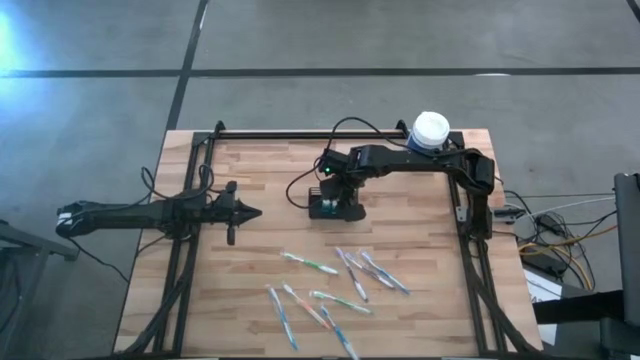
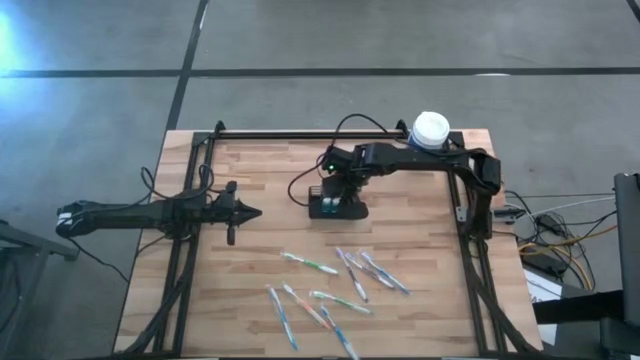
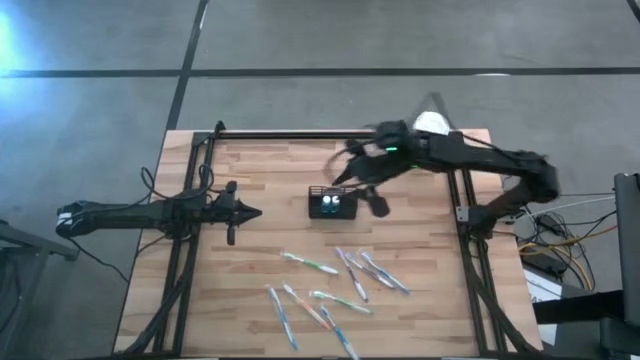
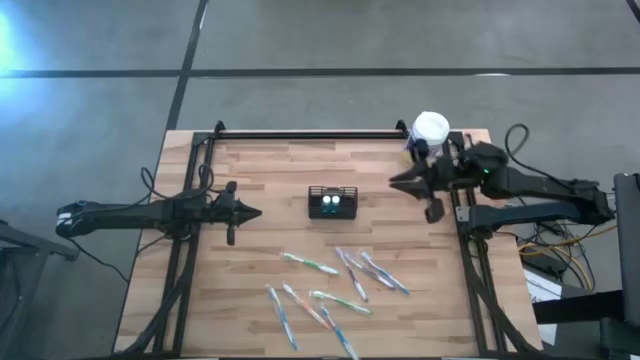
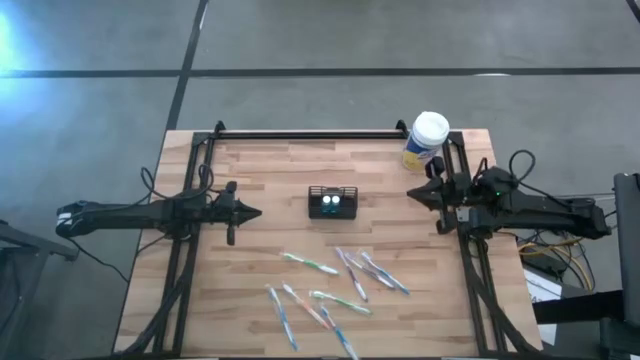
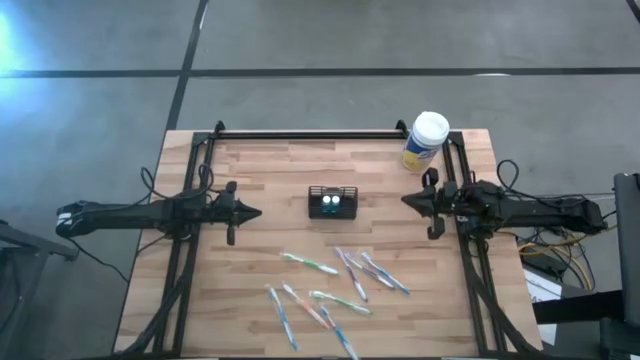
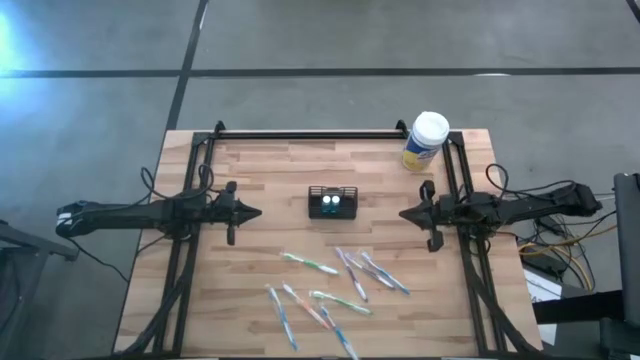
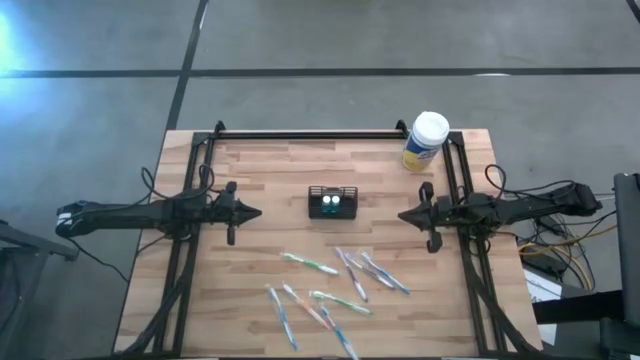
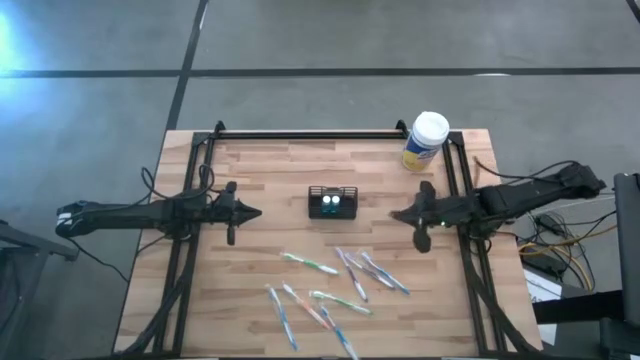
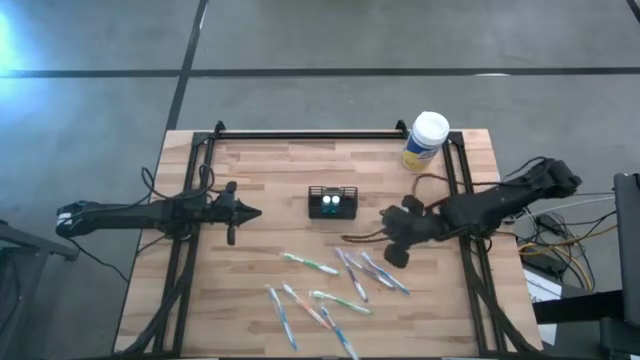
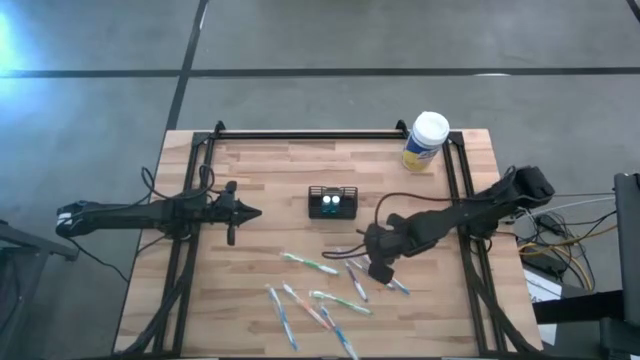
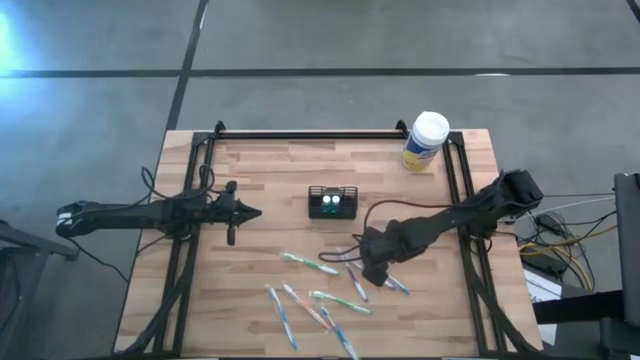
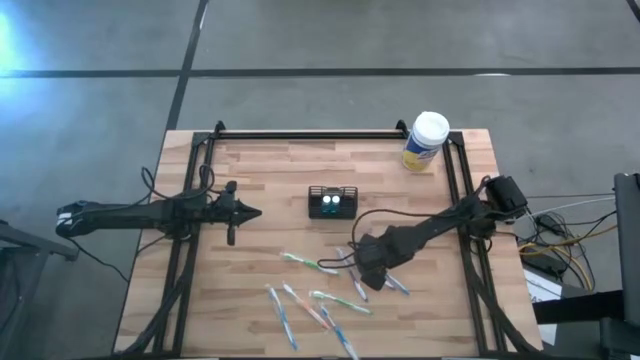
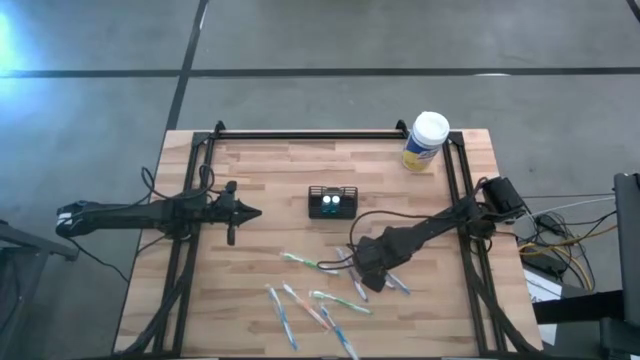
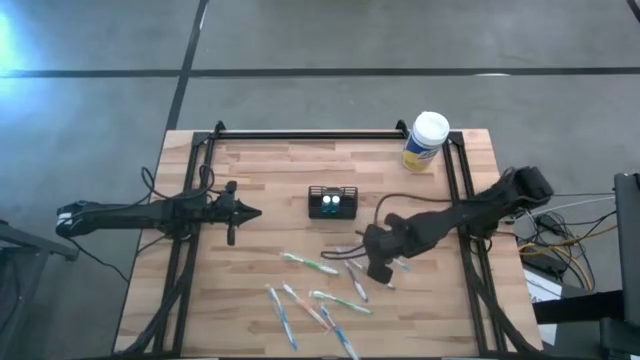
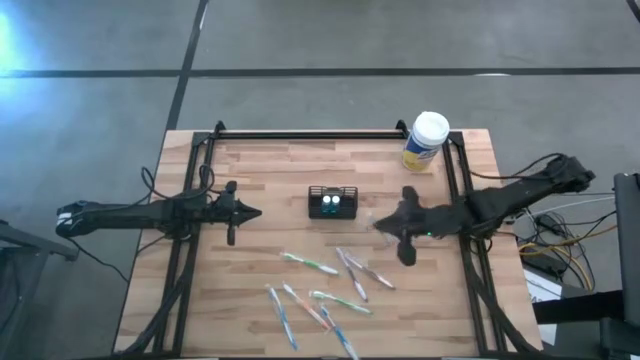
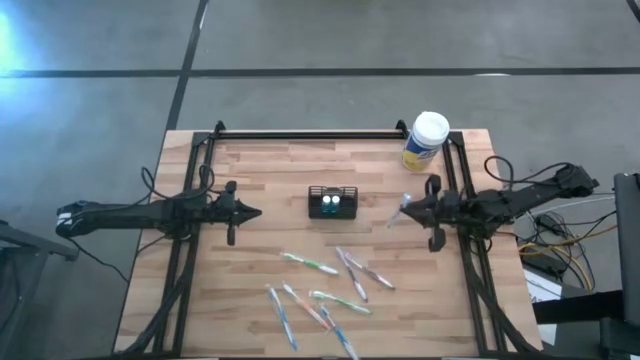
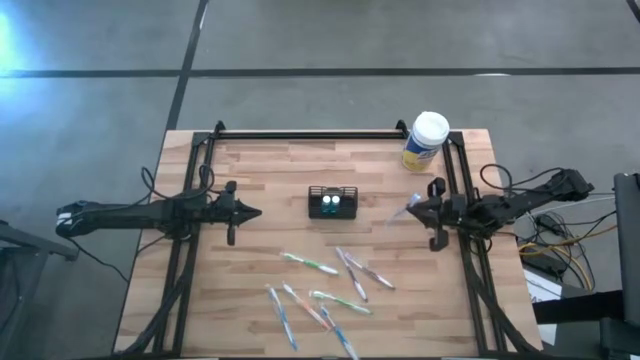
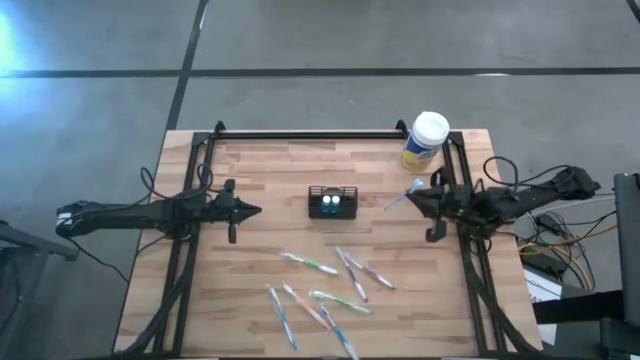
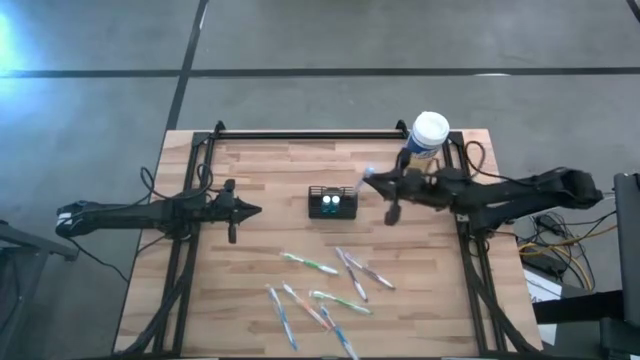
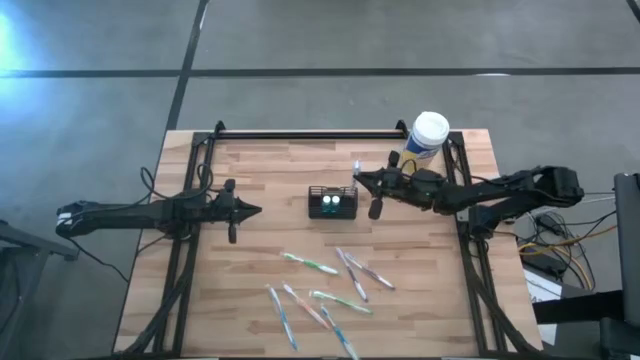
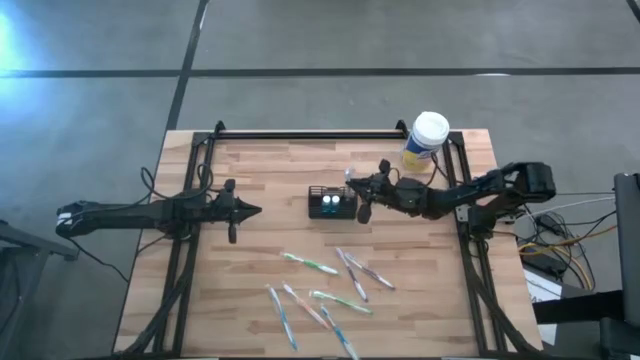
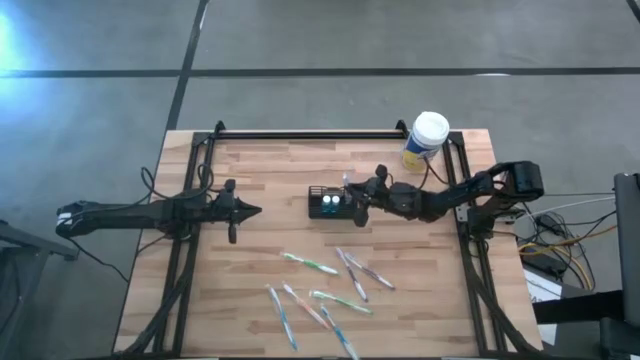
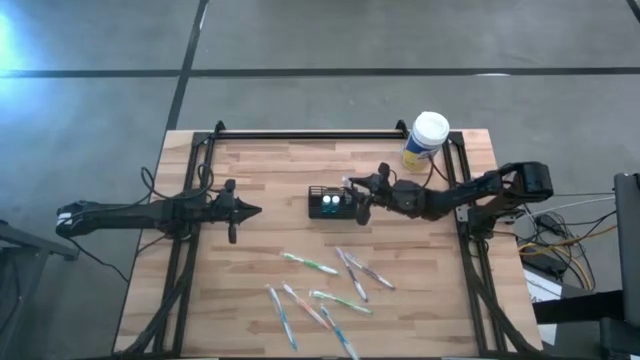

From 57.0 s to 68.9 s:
Task: Pick & Place toothbrushing station
Put the top right blue toothbrush into the black organizer

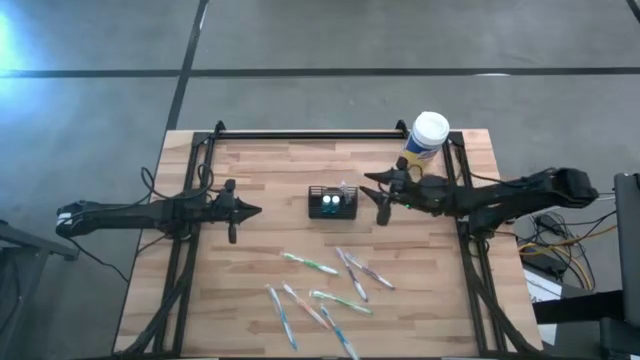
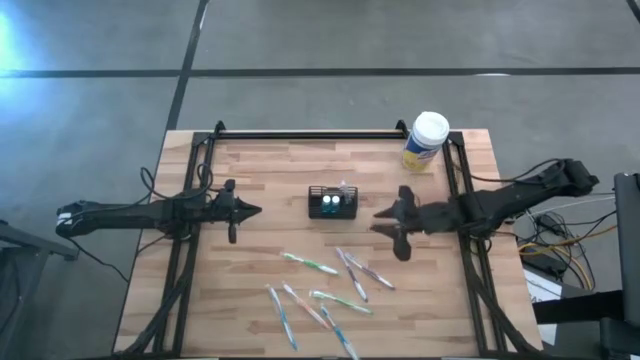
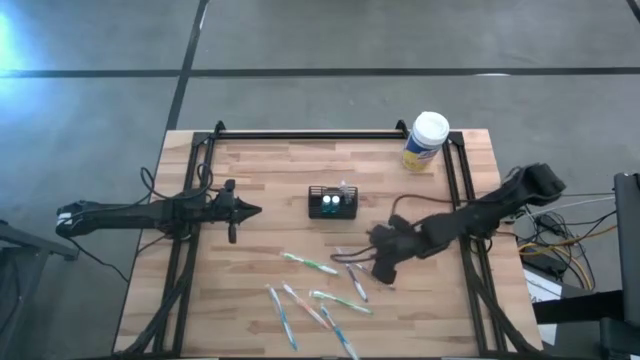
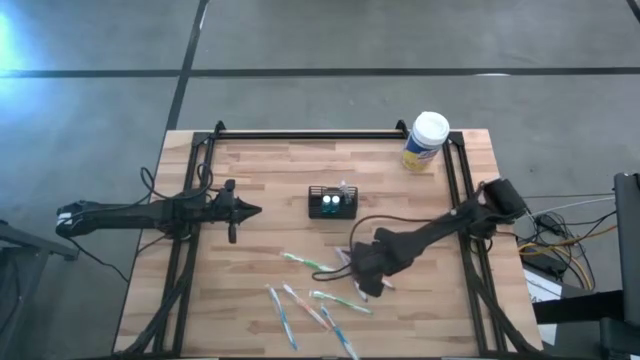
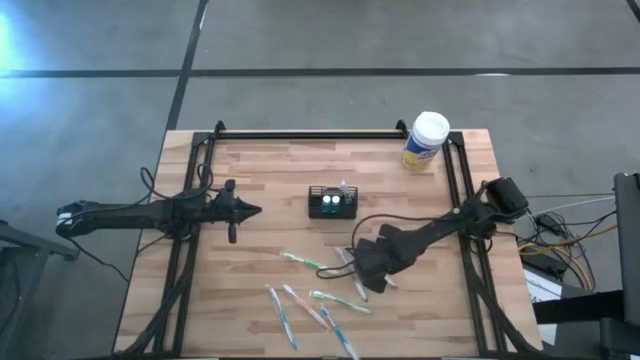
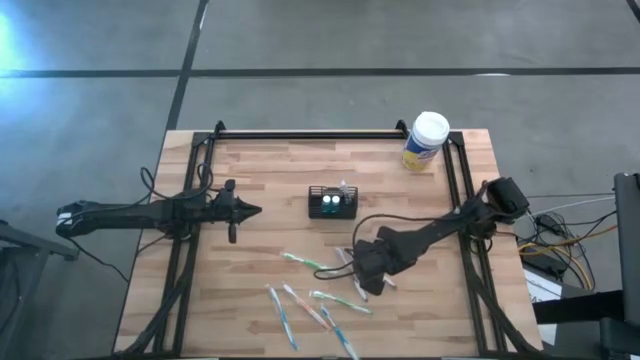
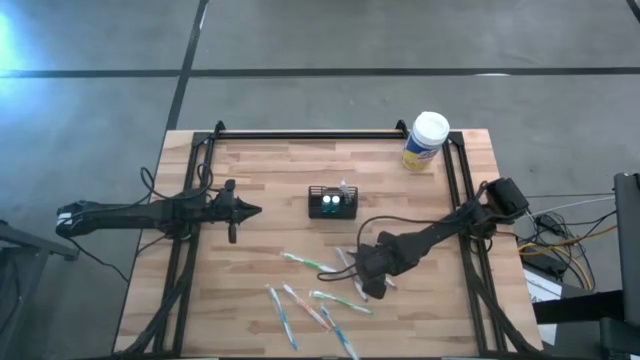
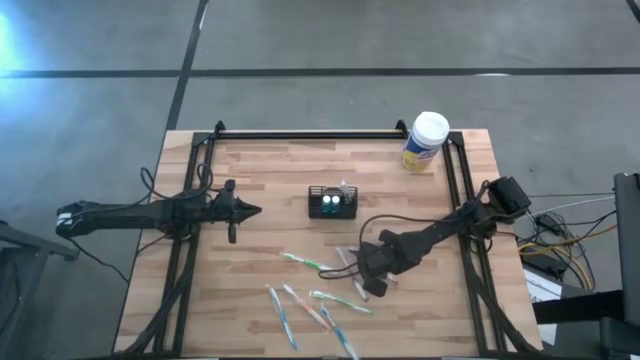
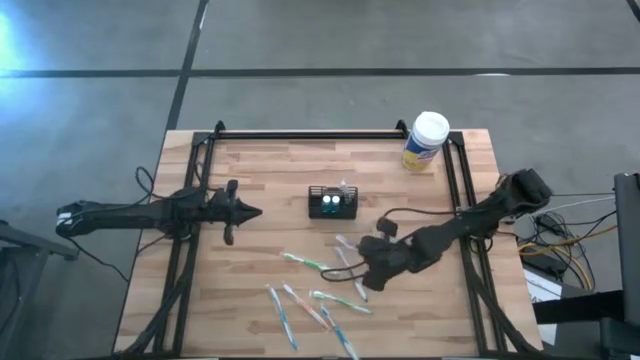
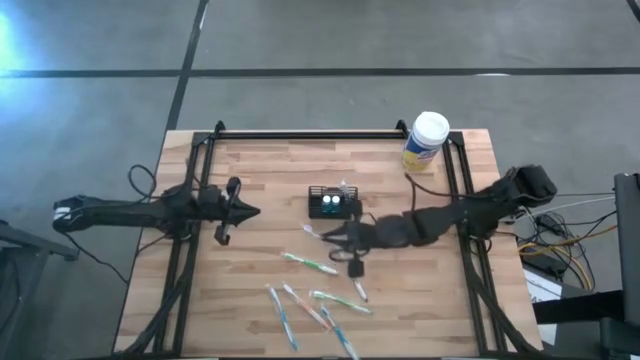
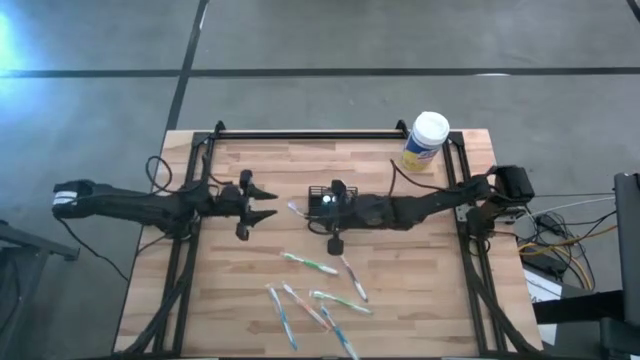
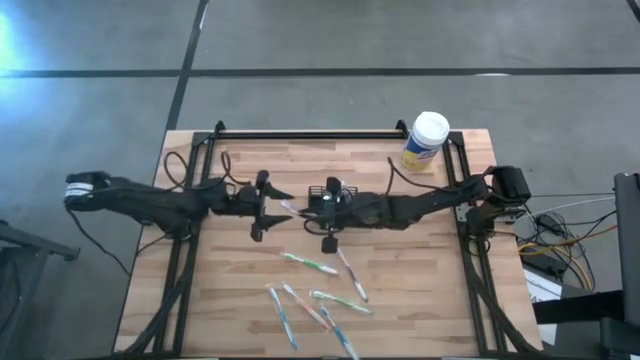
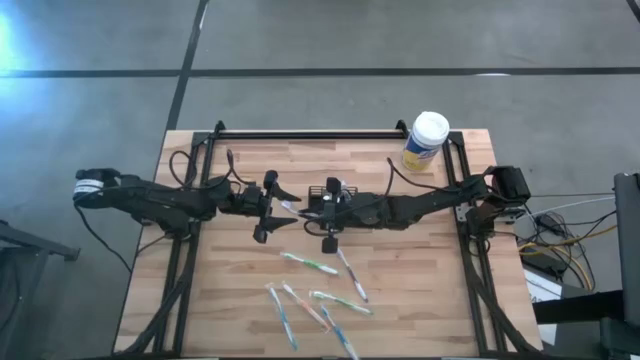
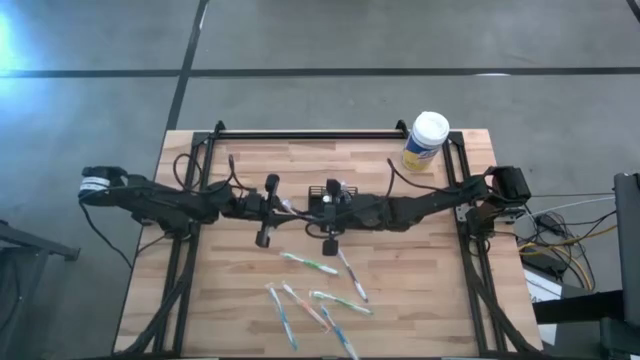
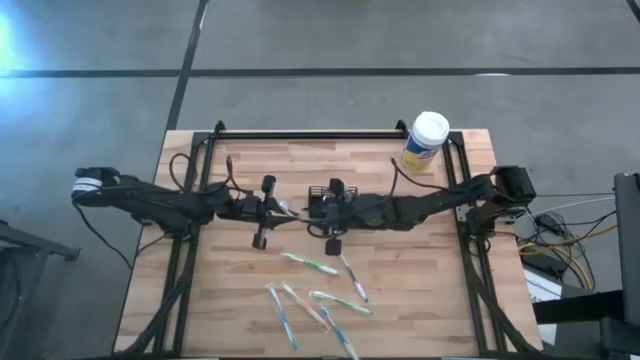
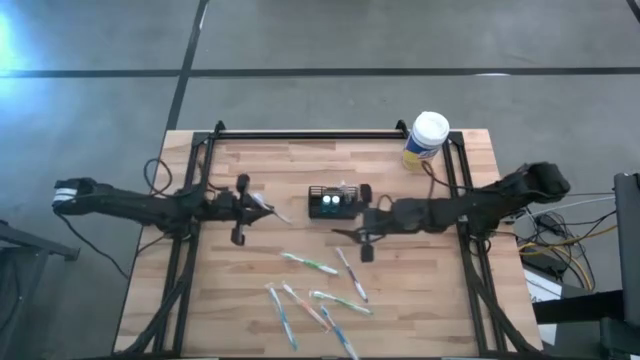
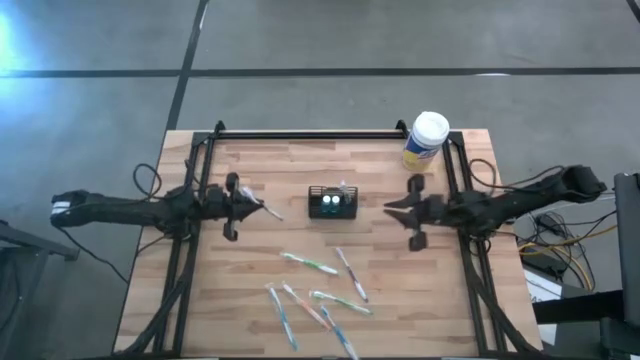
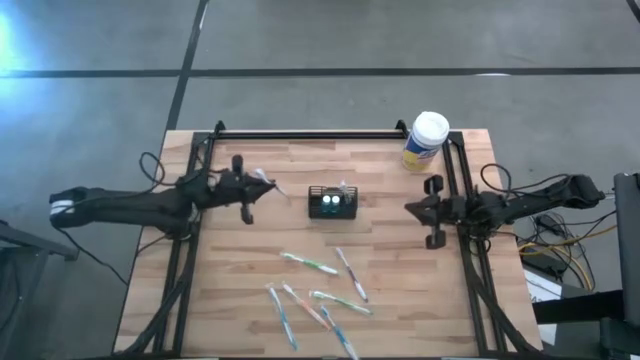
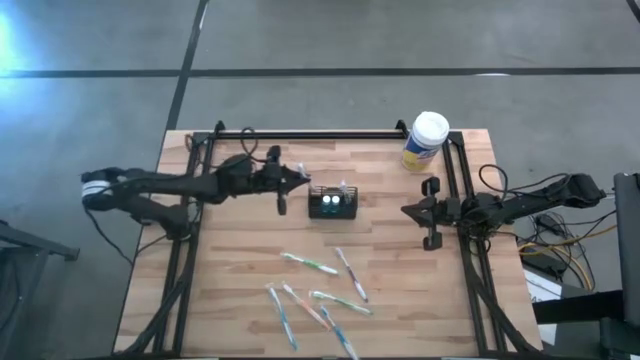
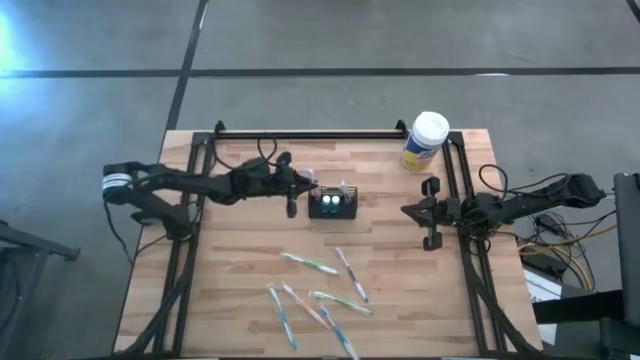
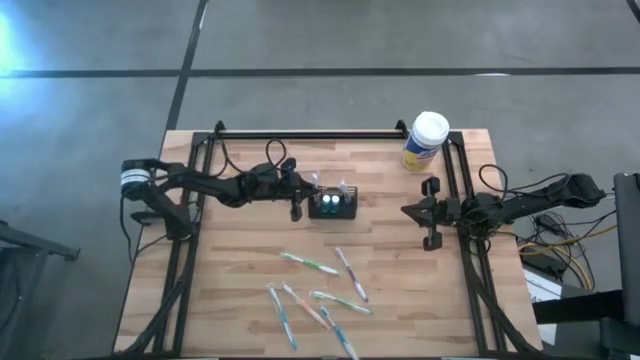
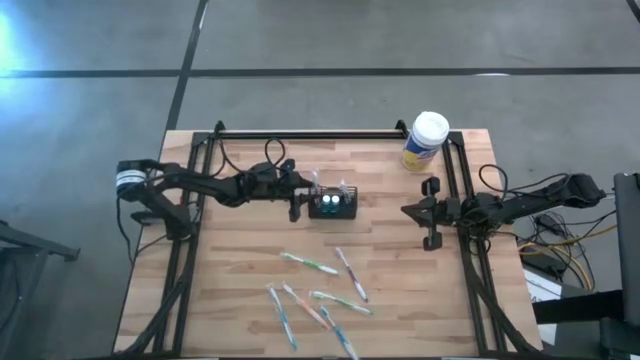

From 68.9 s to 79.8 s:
Put the right purple toothbrush into the black organizer
